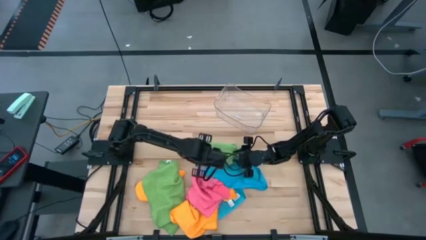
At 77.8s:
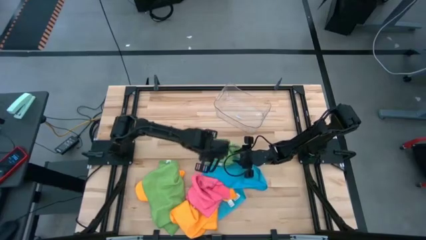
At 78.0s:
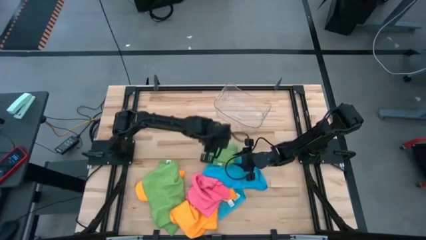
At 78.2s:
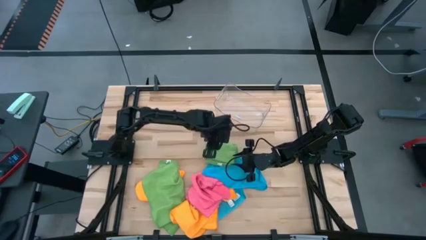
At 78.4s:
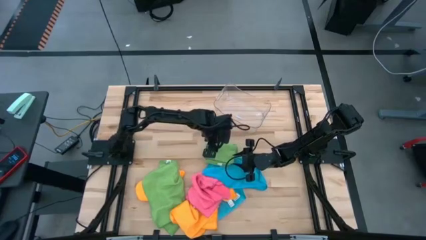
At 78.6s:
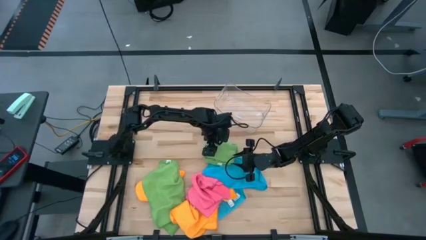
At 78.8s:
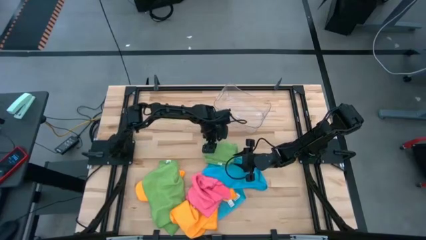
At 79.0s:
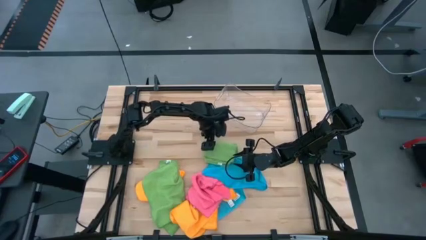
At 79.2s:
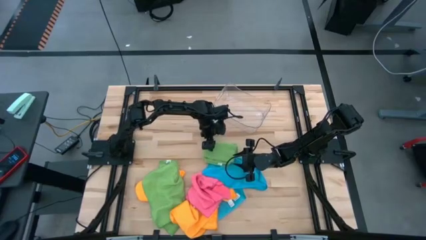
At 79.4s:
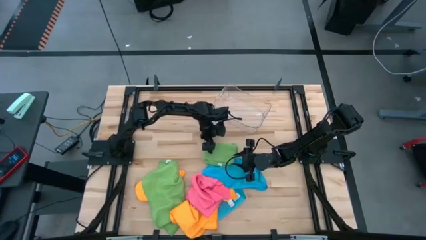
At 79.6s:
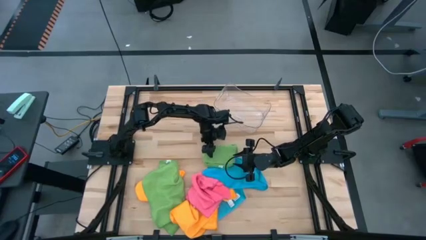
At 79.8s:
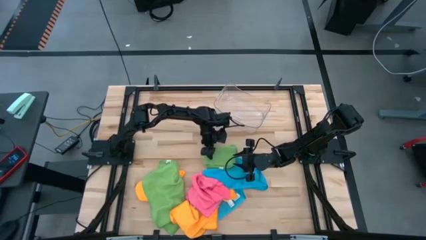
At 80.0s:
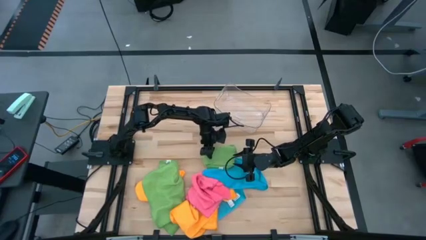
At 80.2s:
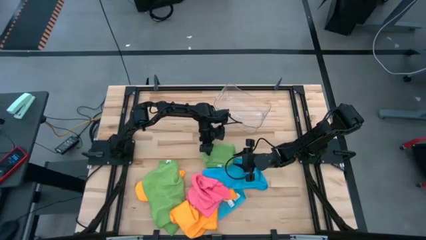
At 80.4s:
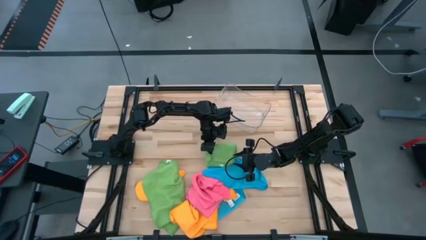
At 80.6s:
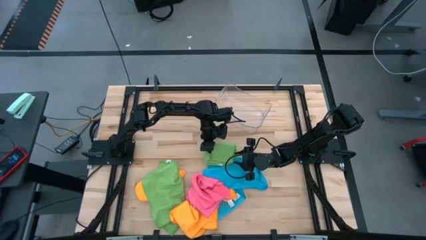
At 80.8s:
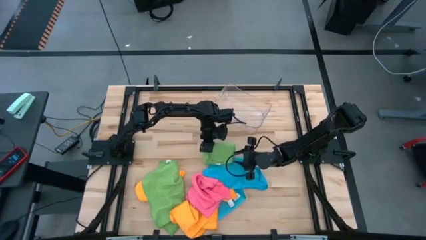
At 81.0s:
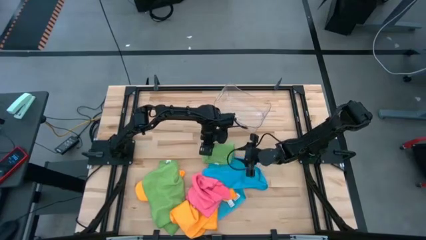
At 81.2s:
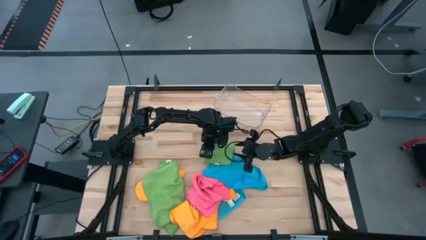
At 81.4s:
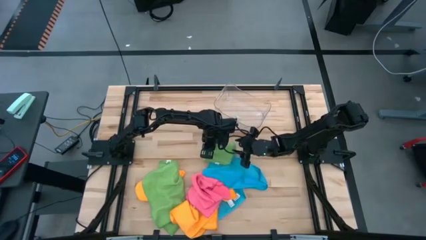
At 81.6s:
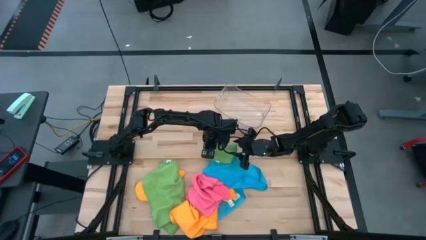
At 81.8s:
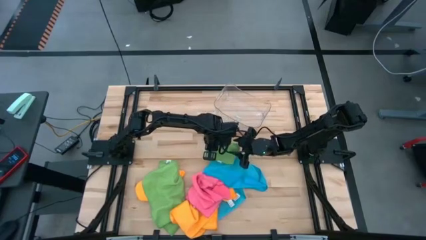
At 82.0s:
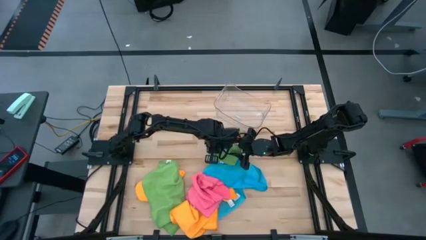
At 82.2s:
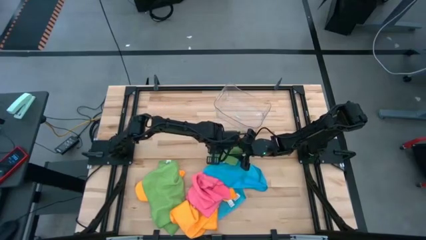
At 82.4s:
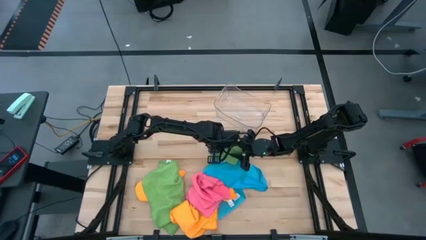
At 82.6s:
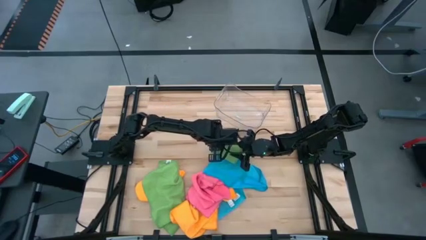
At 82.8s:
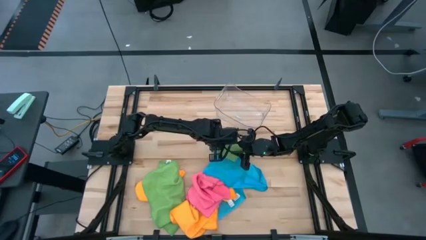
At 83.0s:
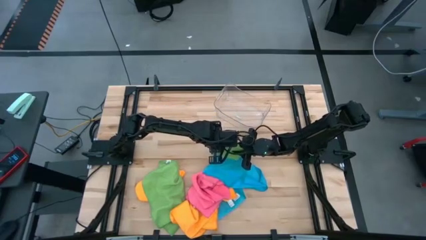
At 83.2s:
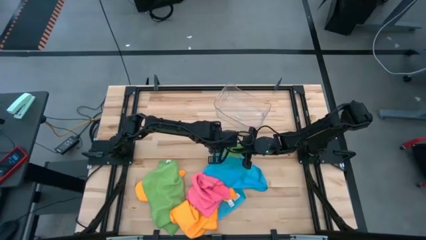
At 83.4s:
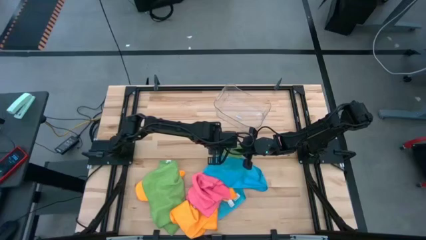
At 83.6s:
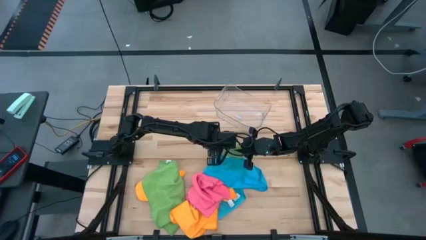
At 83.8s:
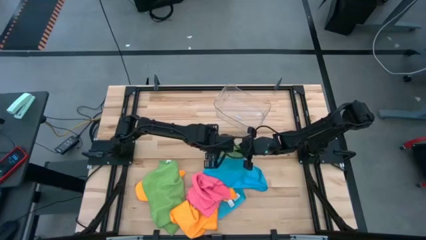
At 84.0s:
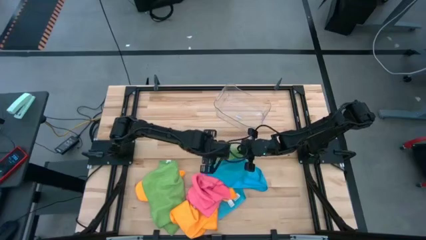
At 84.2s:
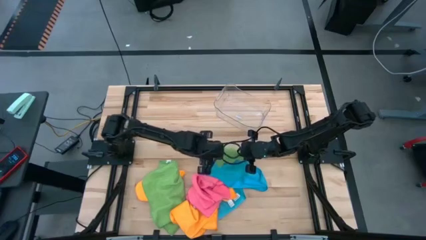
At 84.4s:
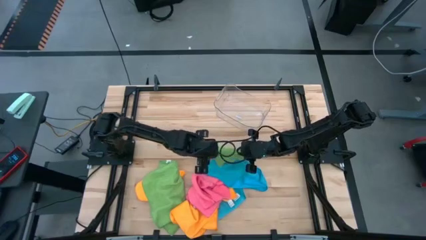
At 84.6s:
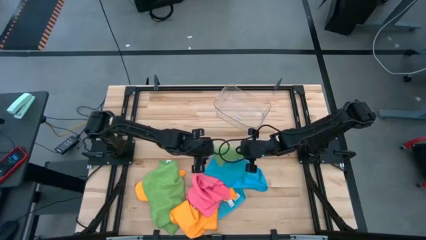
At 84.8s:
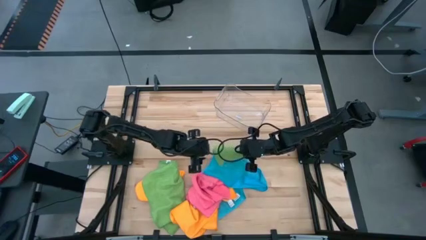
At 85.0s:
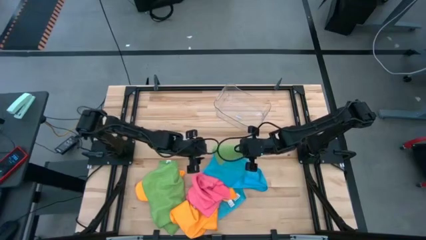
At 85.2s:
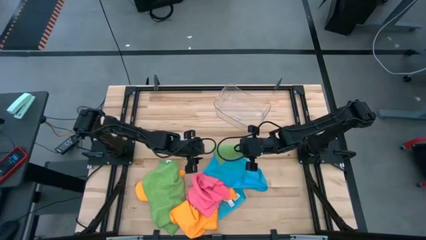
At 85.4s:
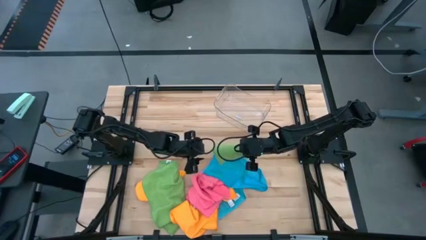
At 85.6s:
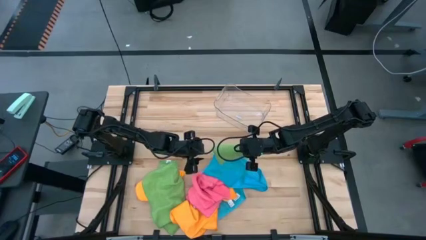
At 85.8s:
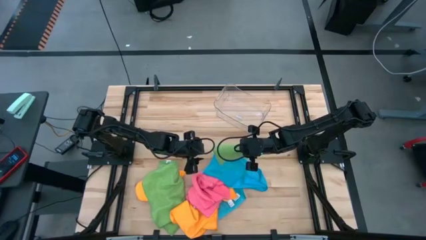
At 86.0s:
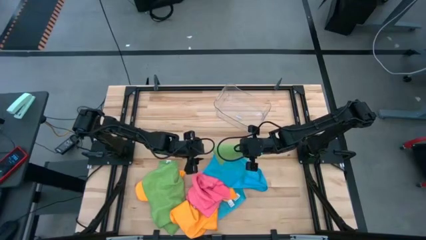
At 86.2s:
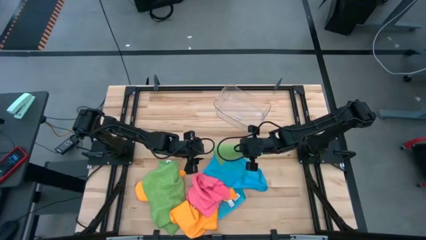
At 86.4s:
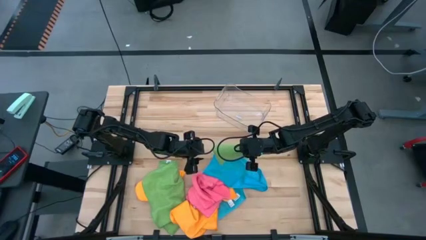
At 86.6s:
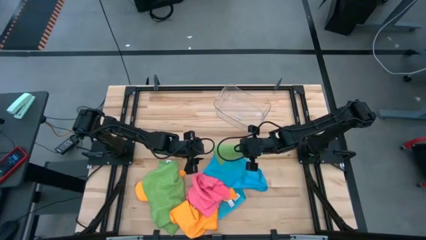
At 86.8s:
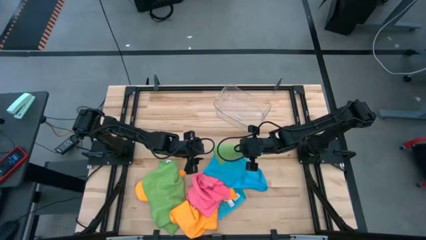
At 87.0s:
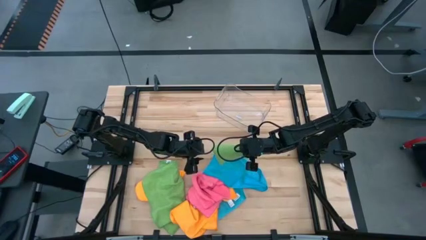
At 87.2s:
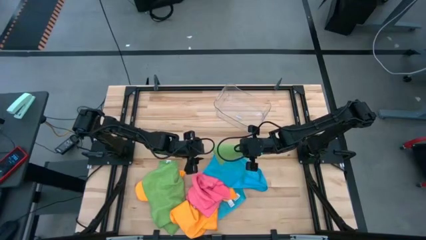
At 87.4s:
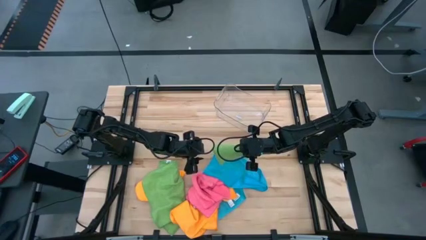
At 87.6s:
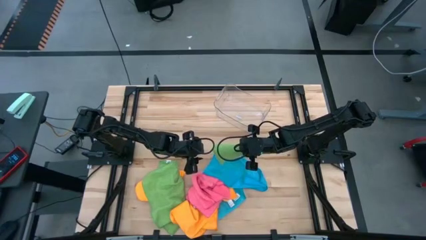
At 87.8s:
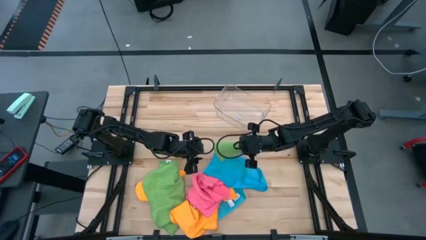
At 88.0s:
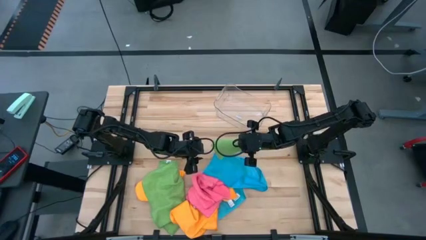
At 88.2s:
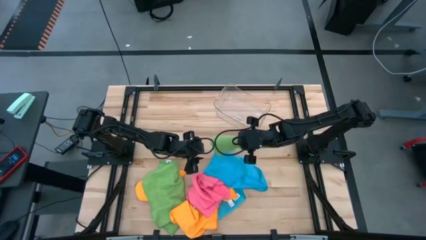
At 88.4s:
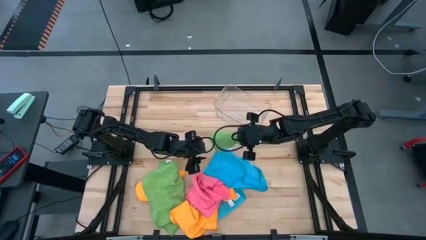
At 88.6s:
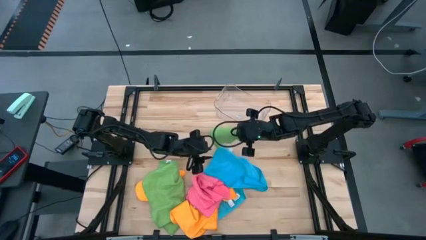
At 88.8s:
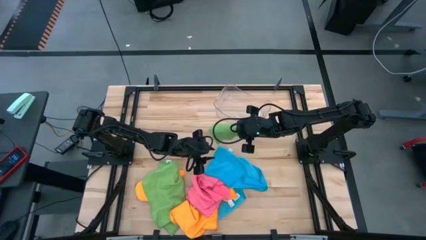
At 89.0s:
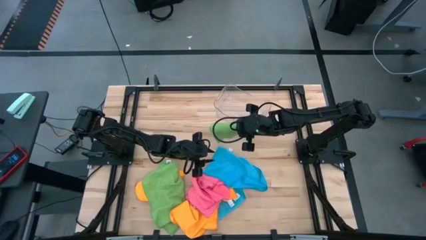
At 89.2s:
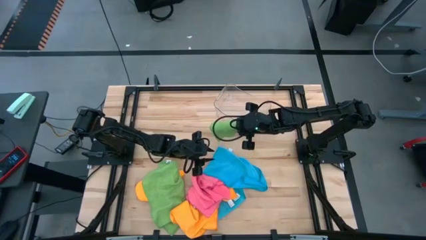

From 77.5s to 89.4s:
Task: Fold microfiber towels
Put the top green towel into the transparent bin

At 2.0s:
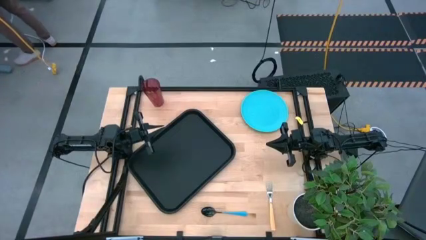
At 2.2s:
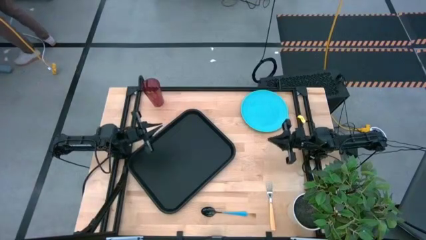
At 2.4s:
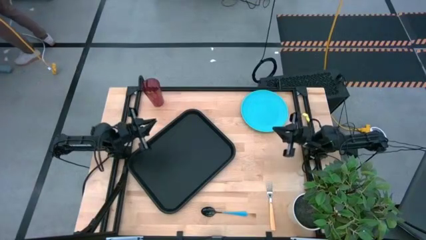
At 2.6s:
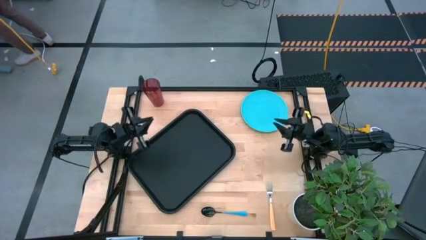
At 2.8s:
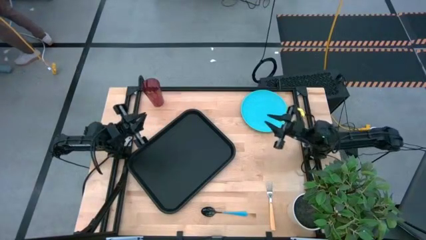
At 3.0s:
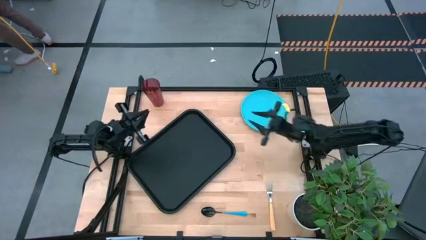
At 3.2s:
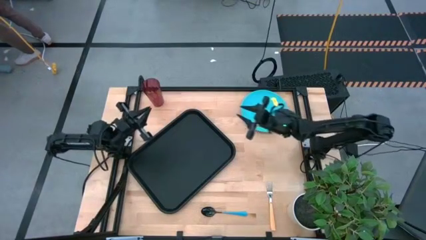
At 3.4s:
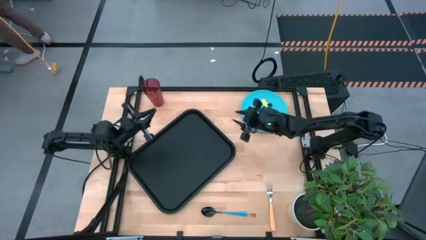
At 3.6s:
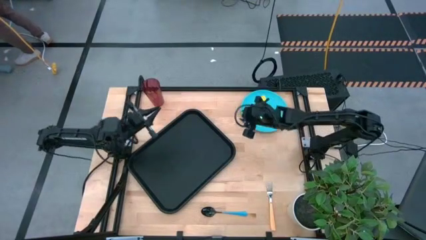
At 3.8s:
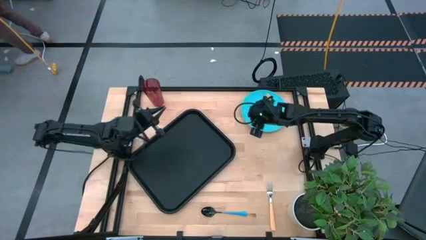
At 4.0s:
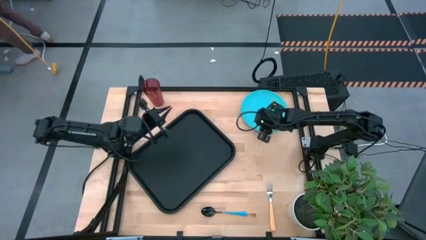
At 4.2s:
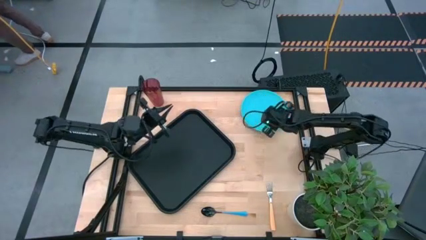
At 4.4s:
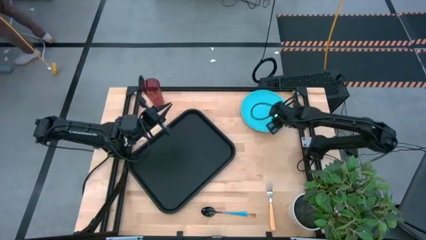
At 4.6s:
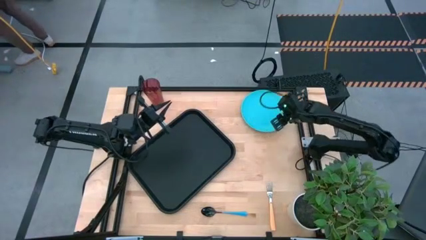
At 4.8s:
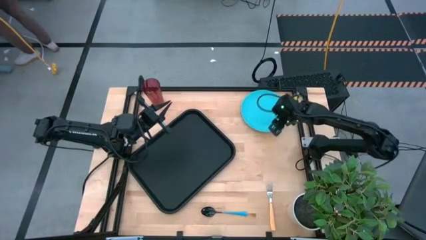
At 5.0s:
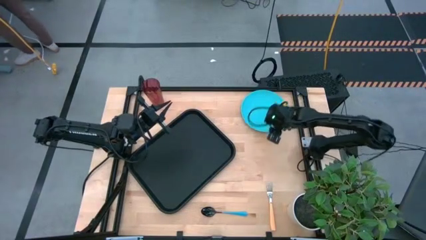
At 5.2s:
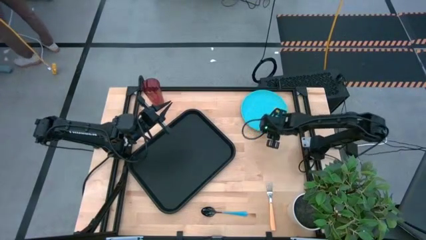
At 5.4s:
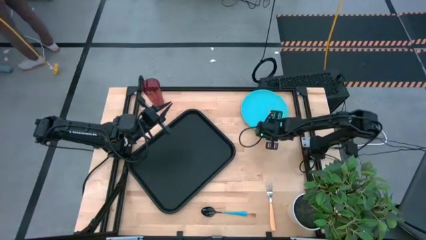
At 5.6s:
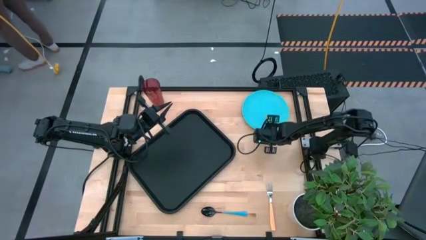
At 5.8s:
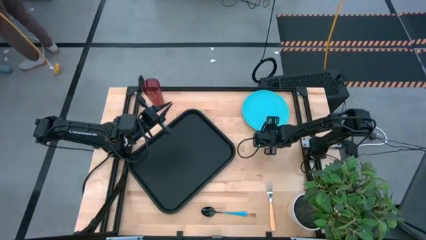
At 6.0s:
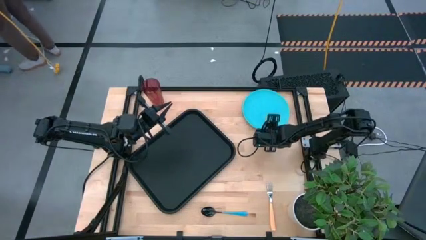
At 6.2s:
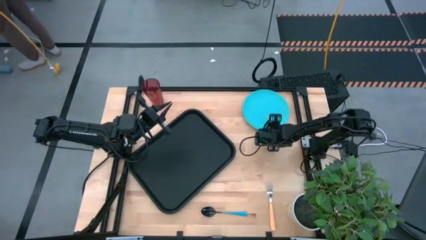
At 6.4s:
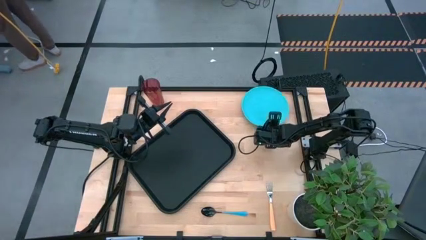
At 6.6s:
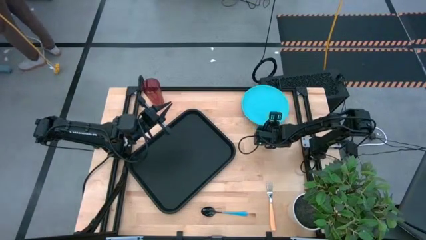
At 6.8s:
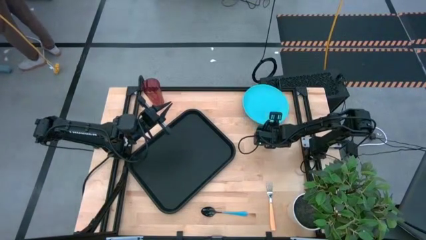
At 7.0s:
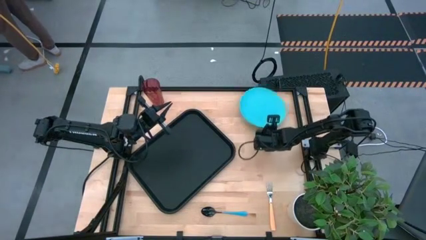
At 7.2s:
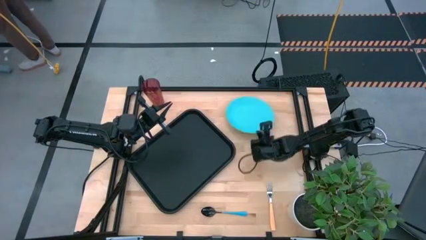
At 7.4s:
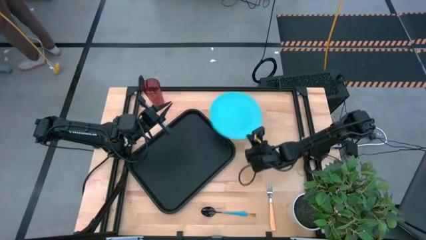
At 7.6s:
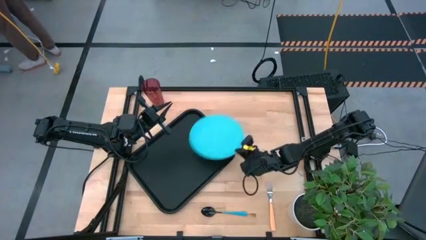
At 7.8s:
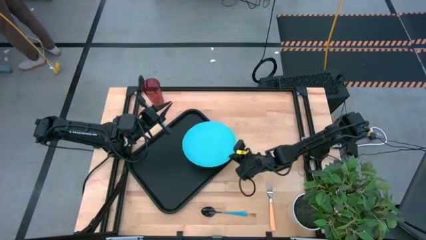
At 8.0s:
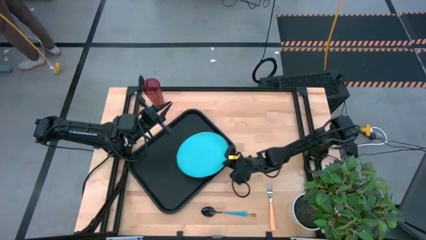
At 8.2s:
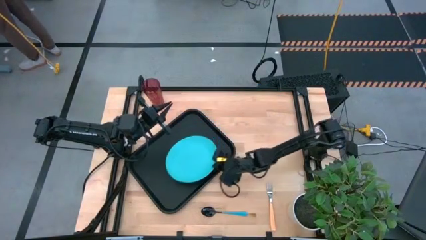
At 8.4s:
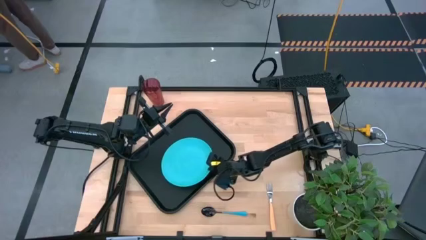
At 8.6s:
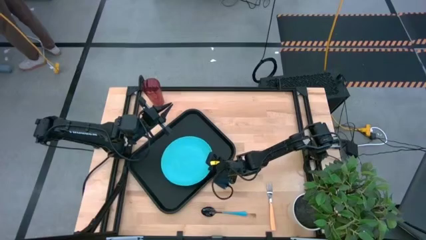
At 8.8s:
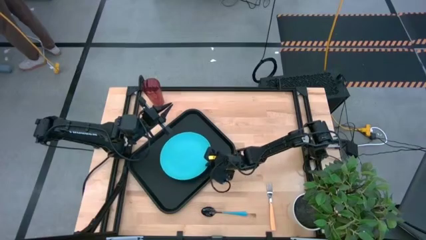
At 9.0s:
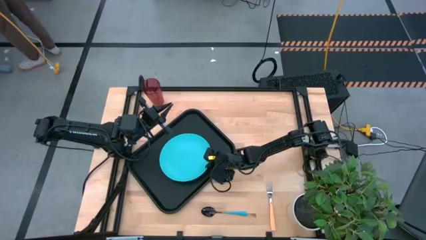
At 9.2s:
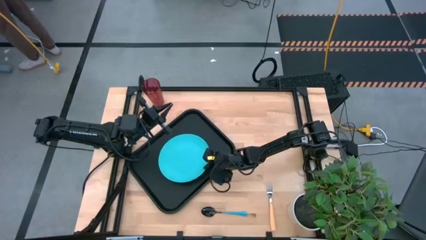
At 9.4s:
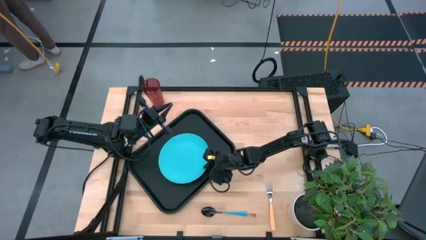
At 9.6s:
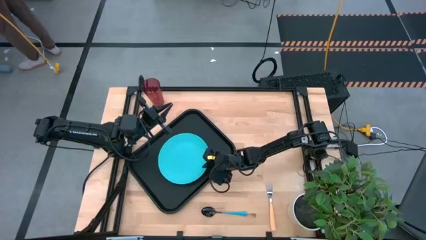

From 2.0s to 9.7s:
Task: Pick and place plate/cup/fork/spoon on tray
Put the blue plate on the black food tray
